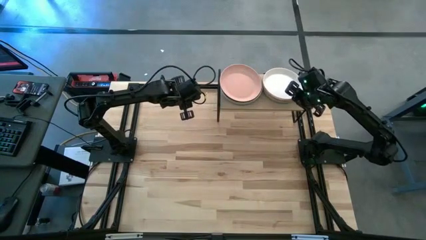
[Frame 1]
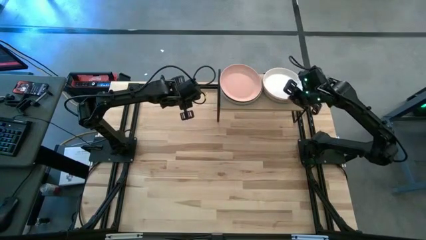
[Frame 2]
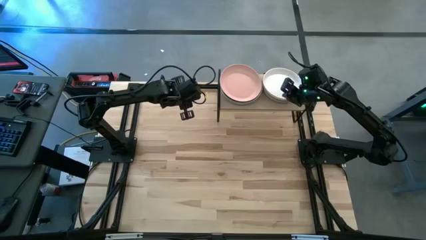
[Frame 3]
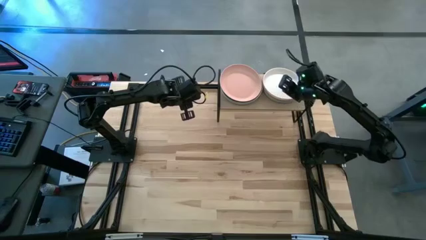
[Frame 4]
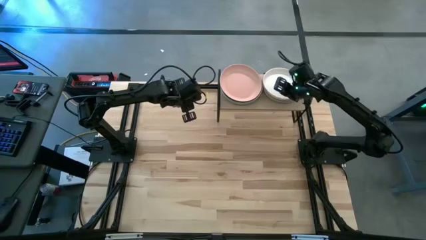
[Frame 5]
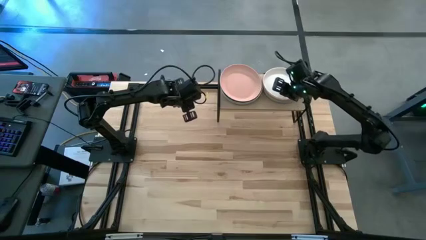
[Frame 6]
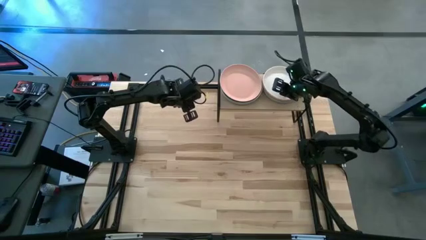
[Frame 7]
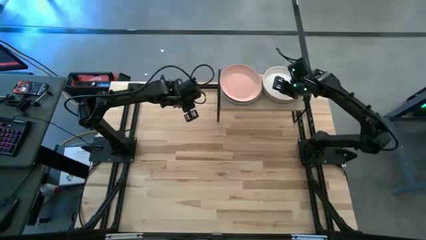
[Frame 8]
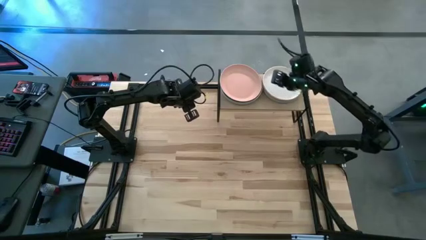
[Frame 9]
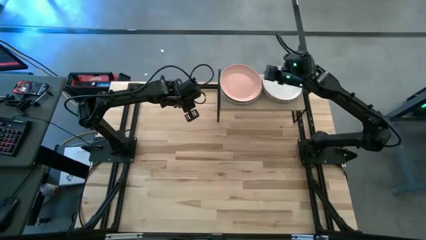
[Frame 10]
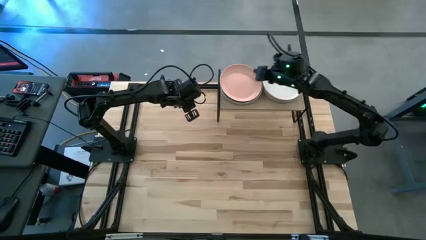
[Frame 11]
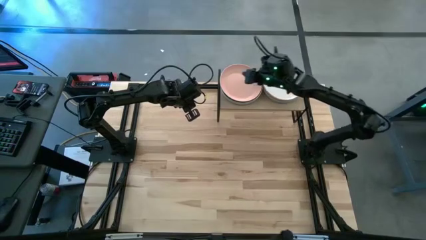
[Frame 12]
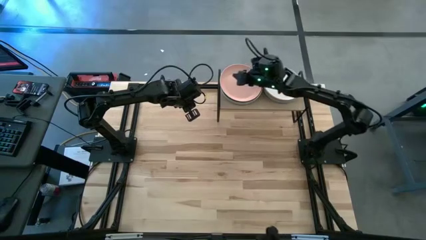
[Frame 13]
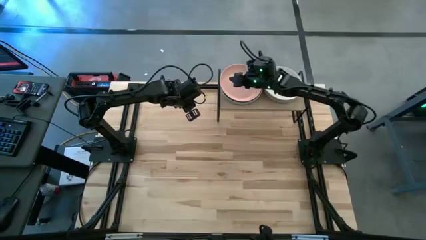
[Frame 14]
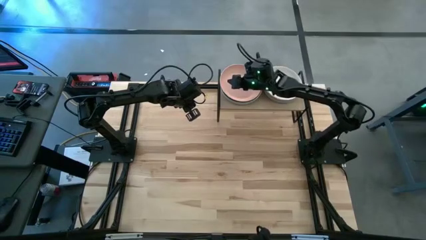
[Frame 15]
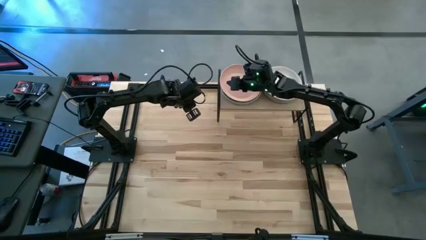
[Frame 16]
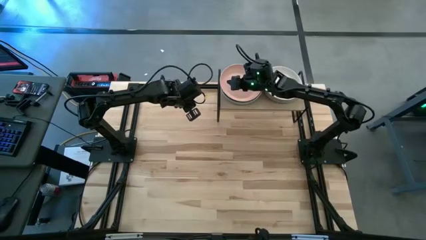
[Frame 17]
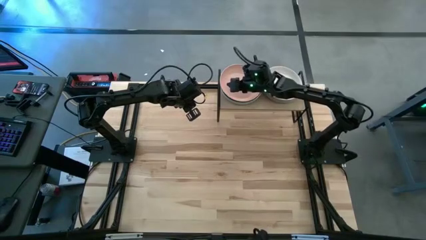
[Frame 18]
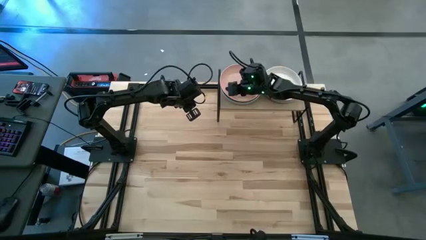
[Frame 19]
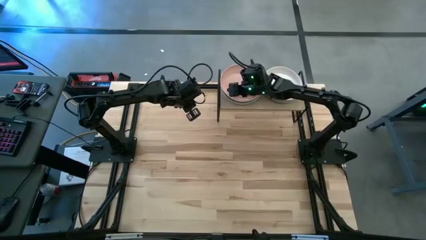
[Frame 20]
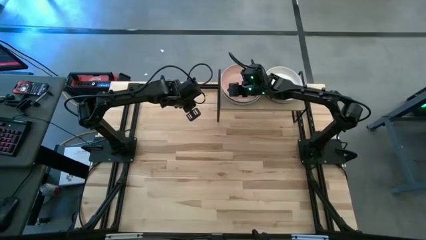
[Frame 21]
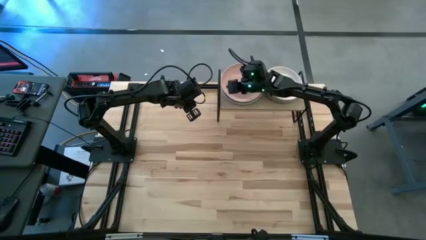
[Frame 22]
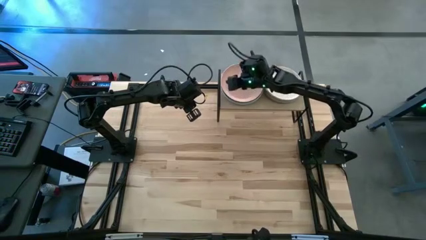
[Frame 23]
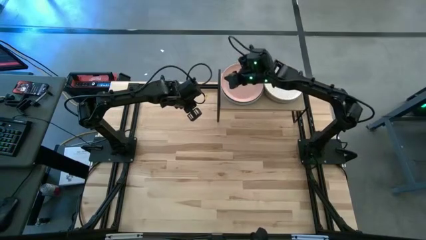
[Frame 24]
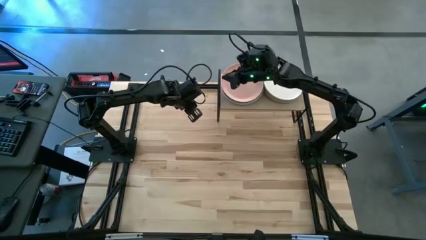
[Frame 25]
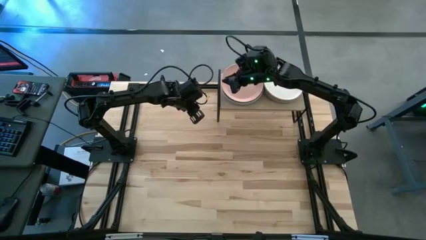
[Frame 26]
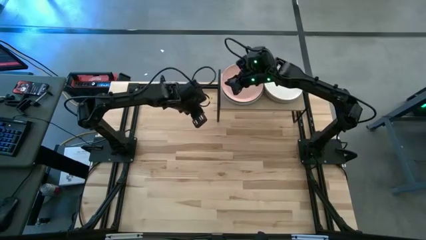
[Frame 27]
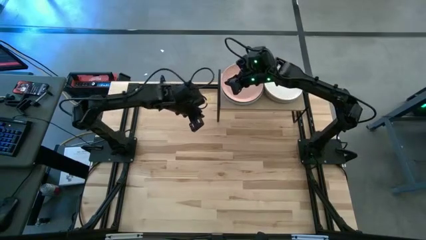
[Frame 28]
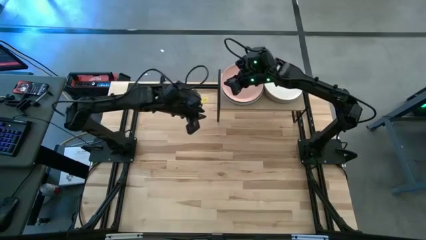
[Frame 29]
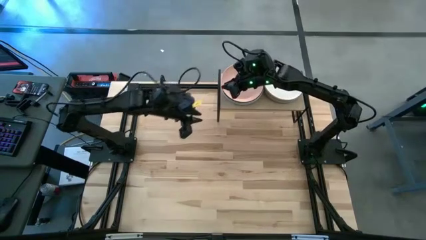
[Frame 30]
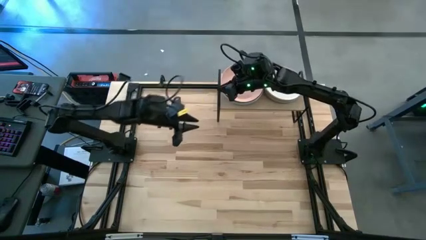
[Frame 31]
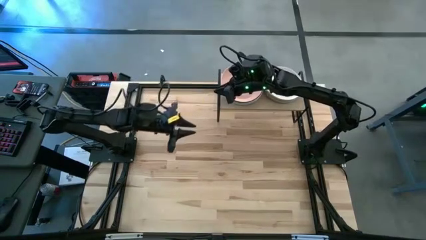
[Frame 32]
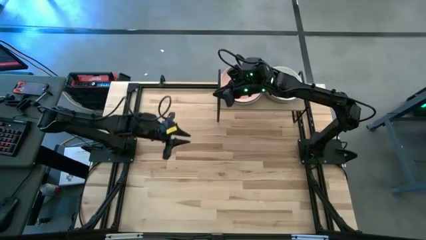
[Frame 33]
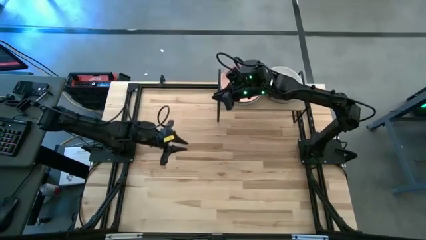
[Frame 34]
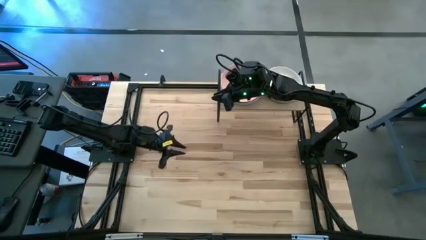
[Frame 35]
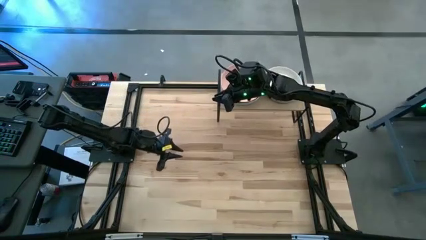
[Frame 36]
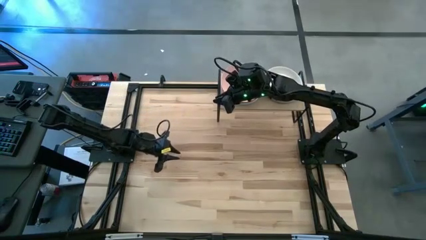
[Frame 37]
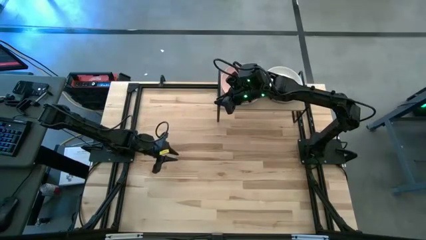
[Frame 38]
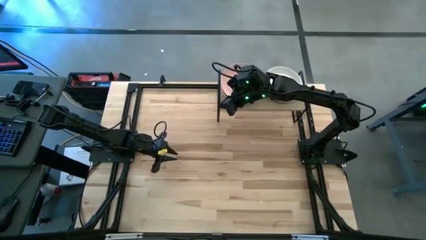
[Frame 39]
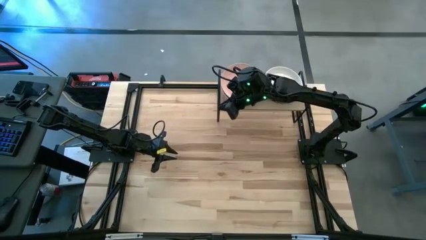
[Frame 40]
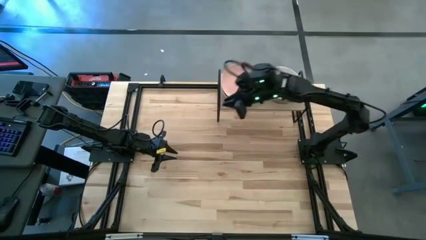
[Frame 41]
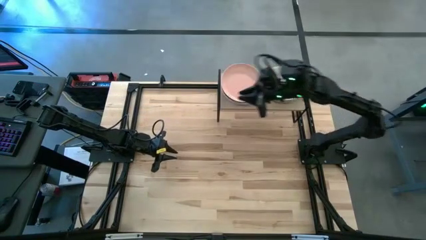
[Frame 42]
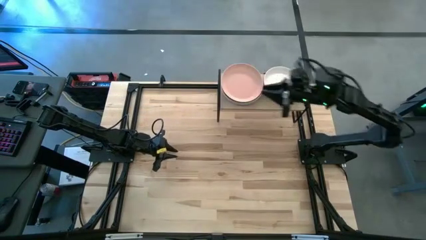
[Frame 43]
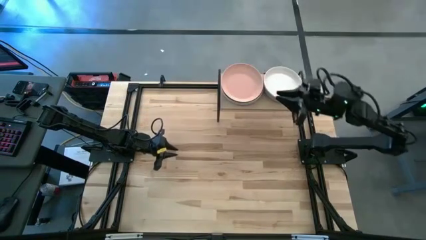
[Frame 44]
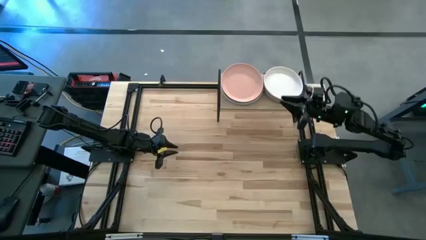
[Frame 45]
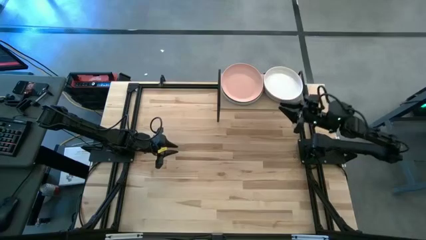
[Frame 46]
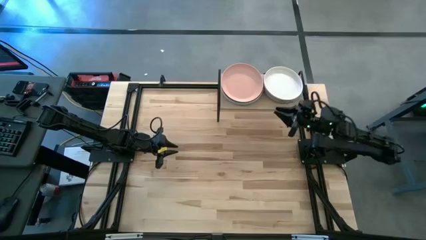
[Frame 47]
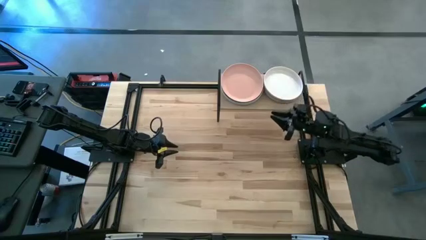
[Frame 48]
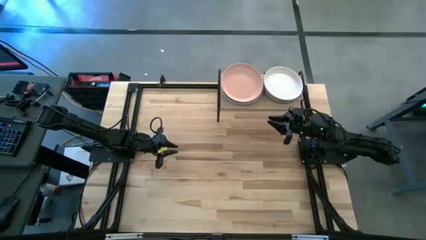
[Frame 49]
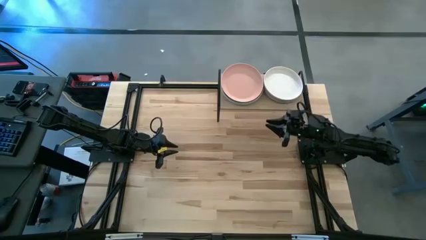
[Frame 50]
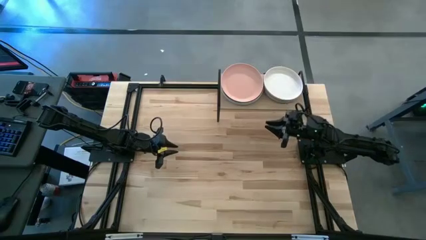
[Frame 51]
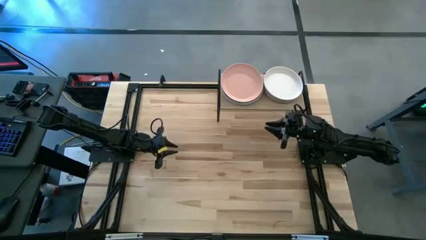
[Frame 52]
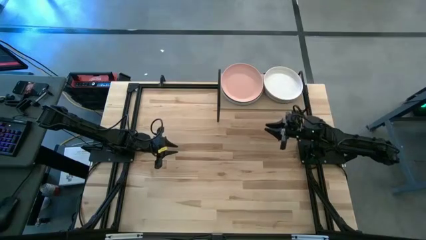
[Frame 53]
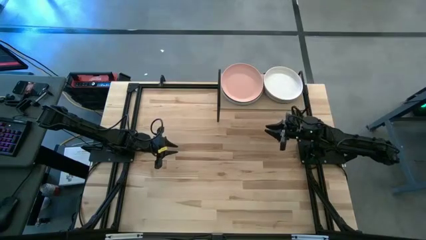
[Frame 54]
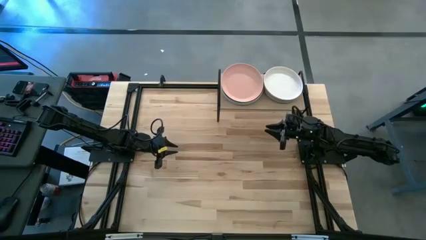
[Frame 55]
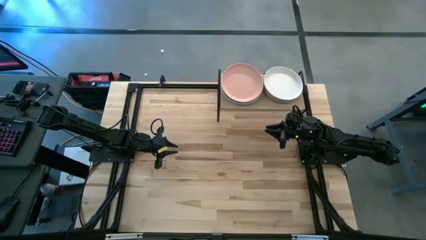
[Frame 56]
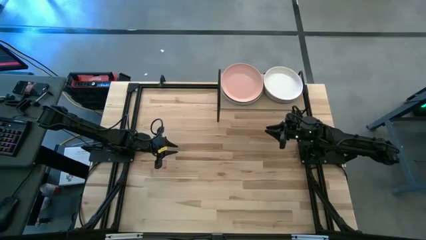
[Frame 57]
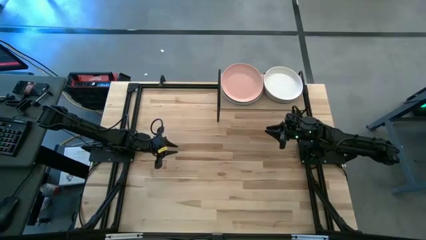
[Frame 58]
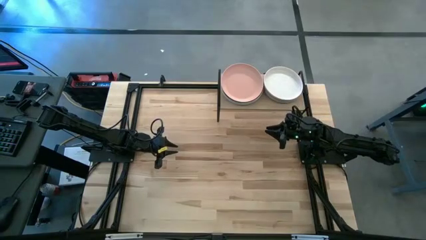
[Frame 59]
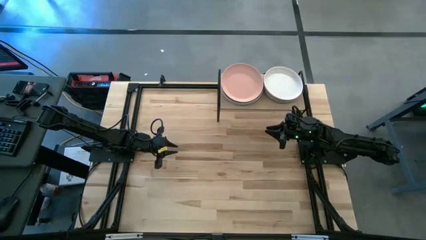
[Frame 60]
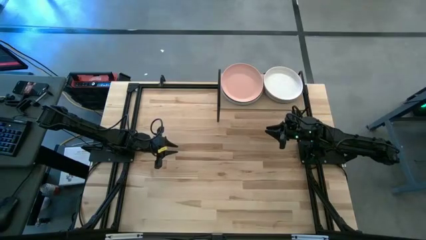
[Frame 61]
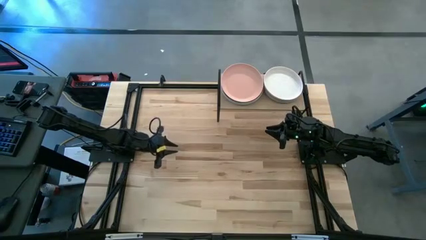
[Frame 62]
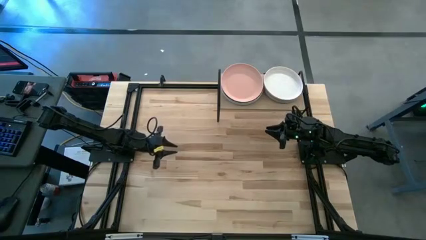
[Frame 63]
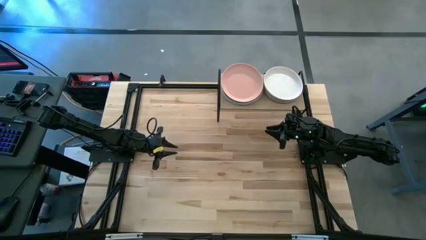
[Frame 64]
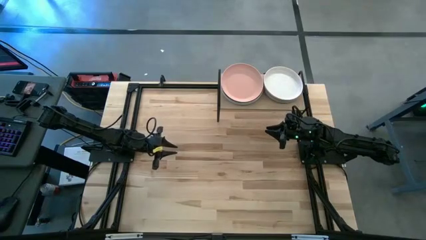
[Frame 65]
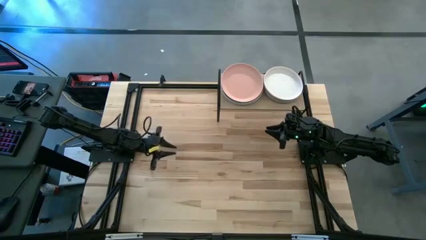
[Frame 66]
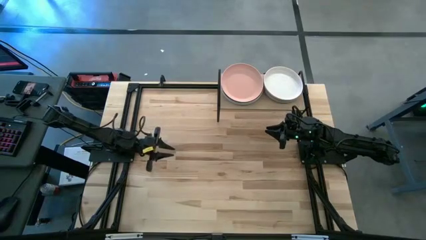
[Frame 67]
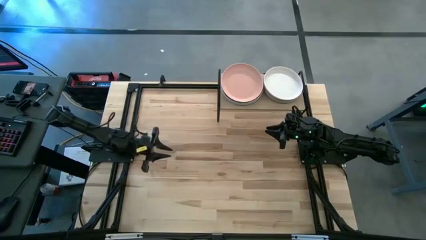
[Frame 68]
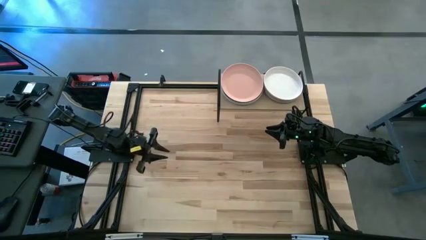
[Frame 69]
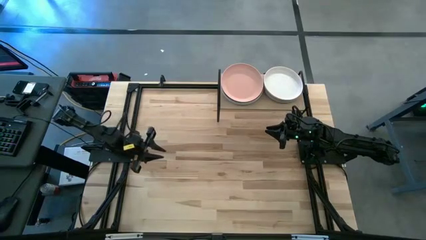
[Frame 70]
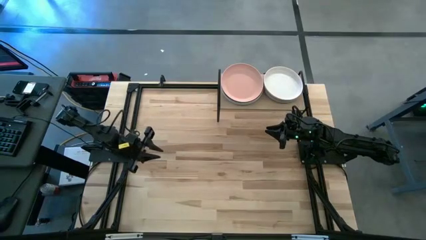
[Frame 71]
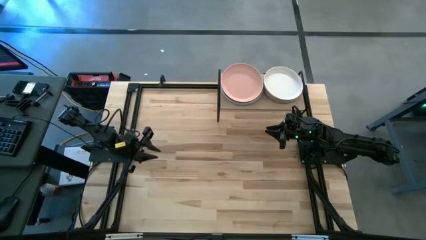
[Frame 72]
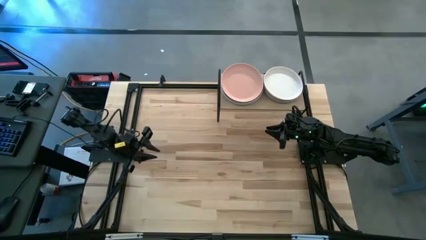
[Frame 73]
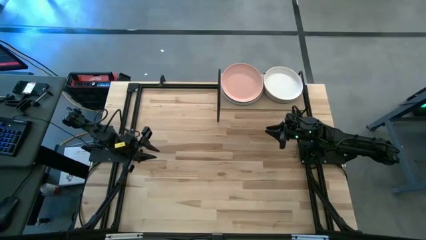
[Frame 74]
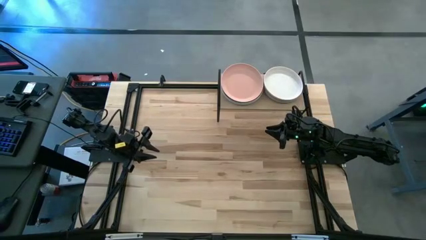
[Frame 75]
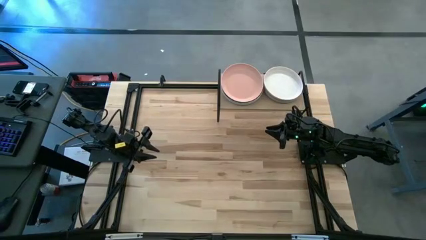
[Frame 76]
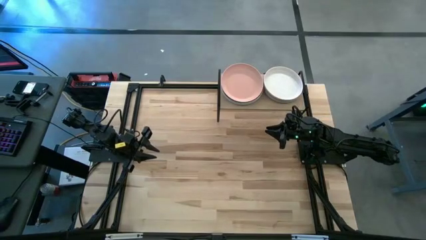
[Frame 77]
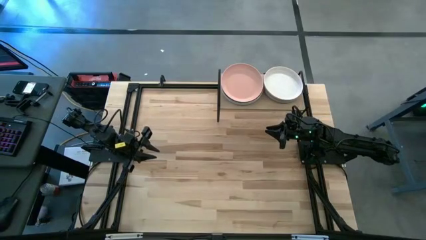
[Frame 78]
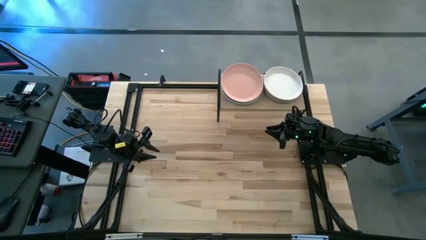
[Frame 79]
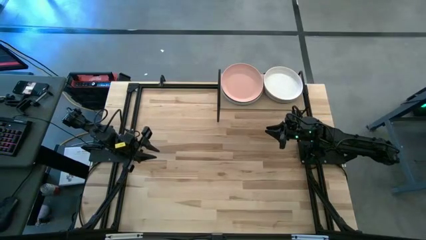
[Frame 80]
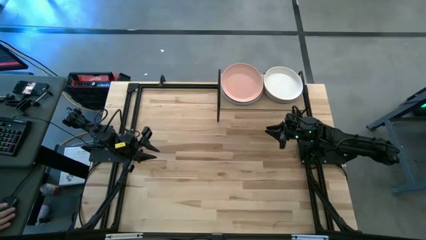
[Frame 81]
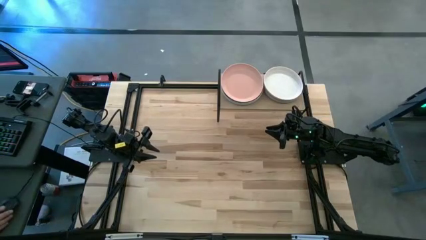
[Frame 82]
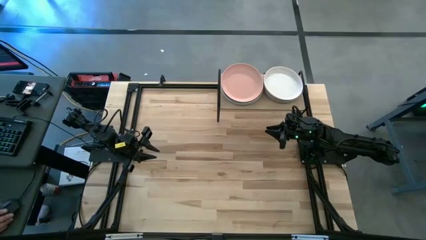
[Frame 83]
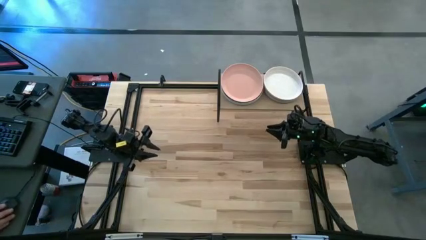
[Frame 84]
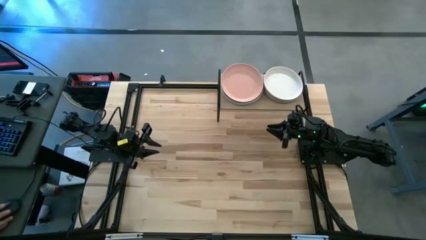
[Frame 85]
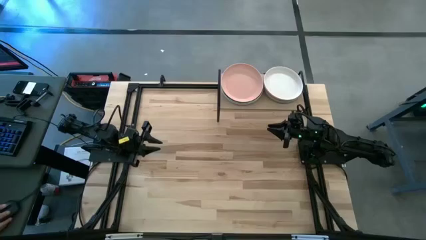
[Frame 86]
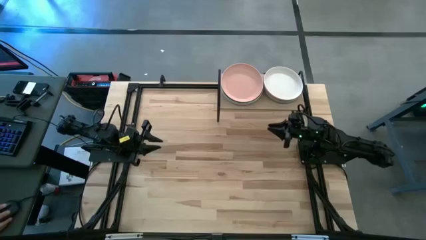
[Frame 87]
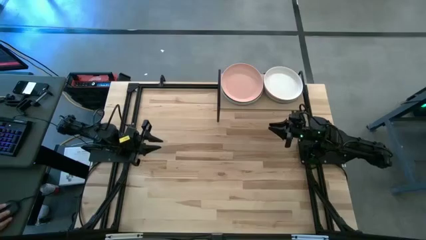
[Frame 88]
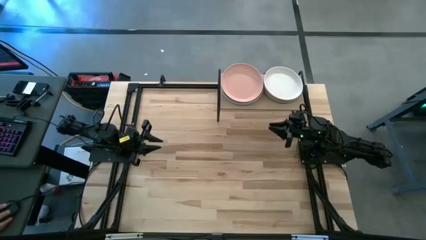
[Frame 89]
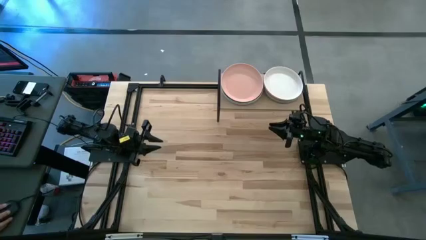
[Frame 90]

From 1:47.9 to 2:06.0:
Task: Place and stack plates onto a shelf
Return to Home Position
